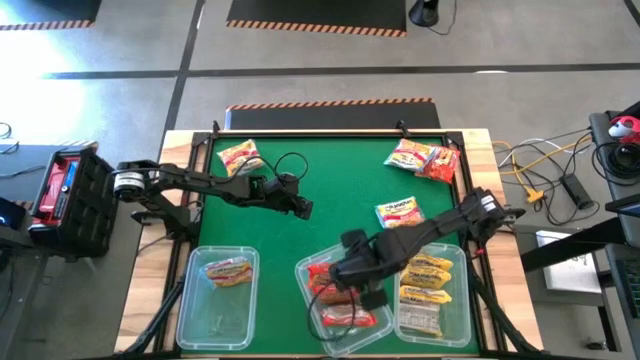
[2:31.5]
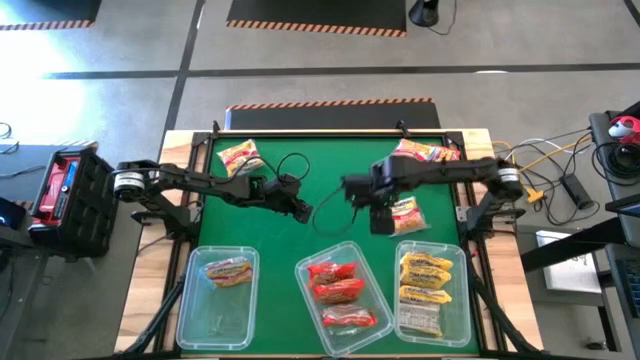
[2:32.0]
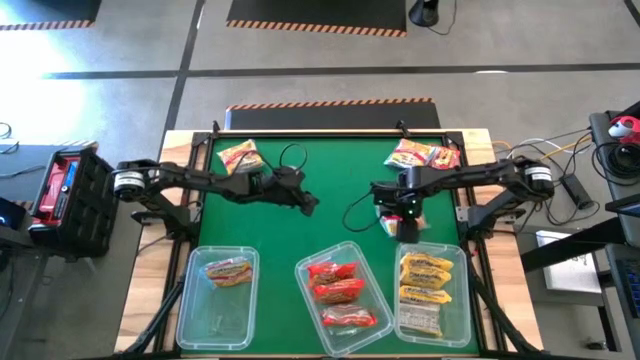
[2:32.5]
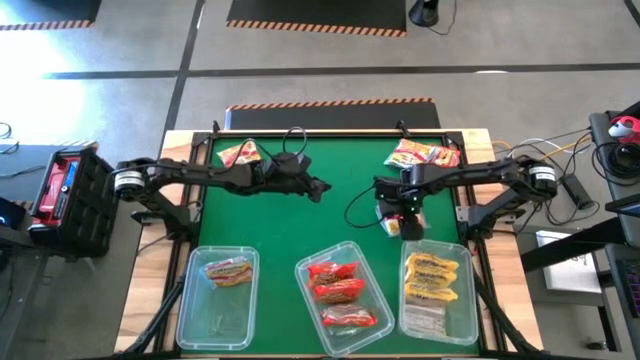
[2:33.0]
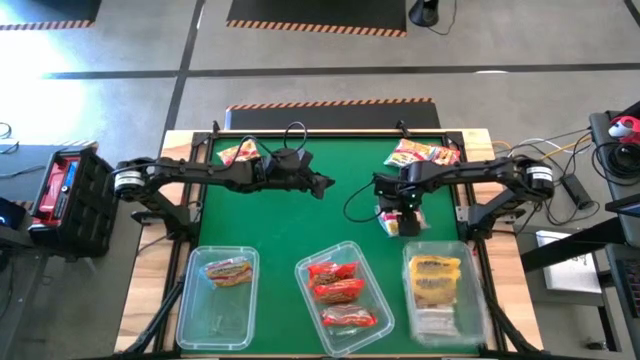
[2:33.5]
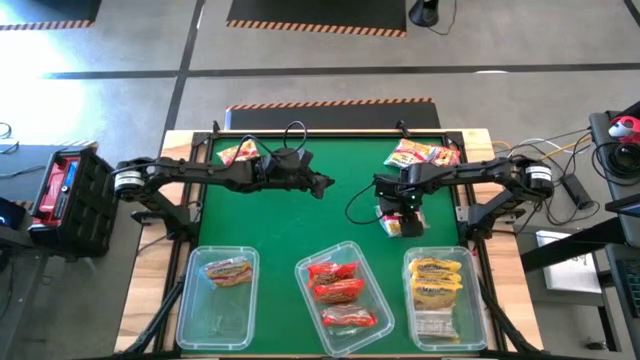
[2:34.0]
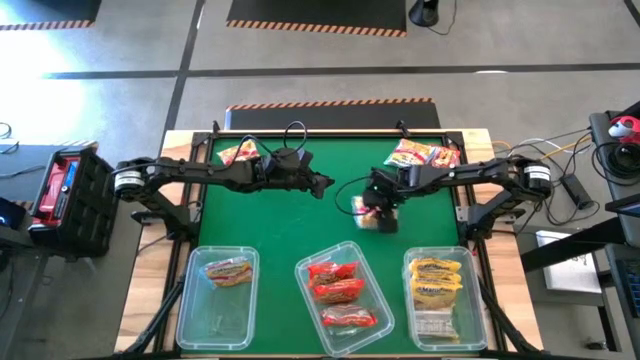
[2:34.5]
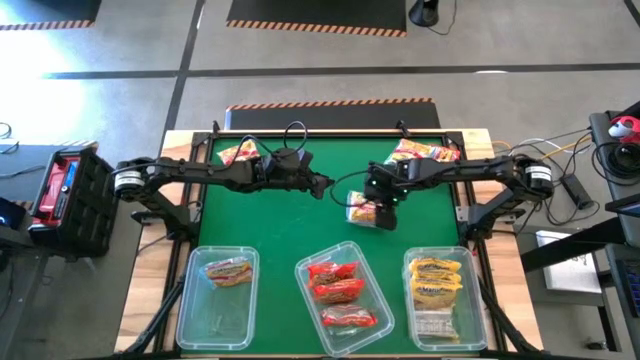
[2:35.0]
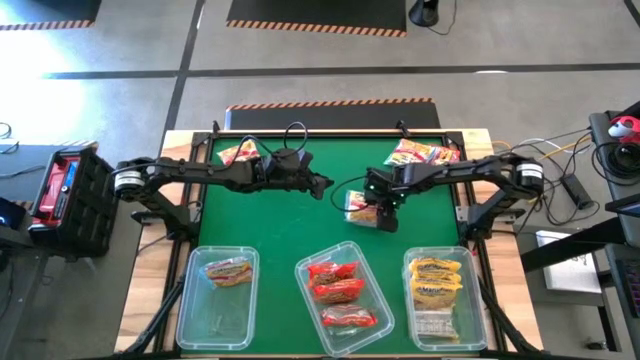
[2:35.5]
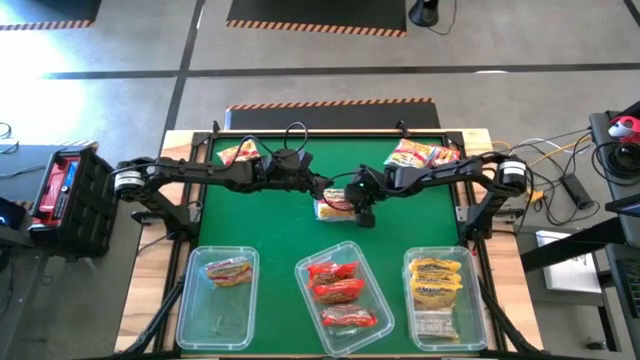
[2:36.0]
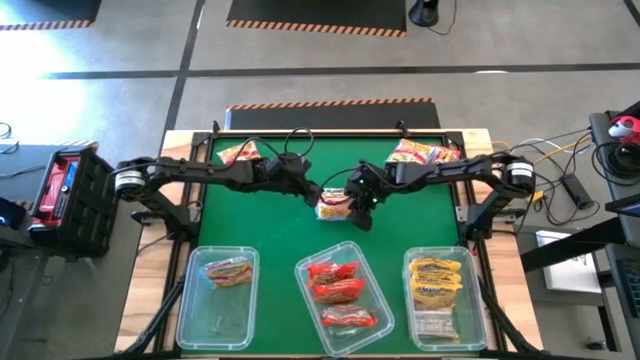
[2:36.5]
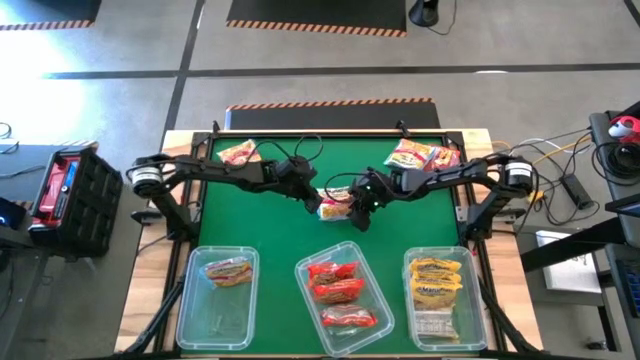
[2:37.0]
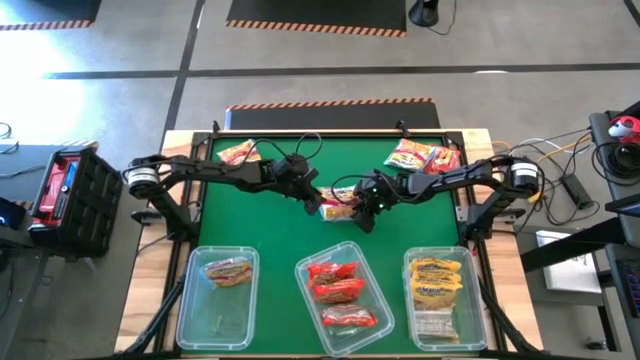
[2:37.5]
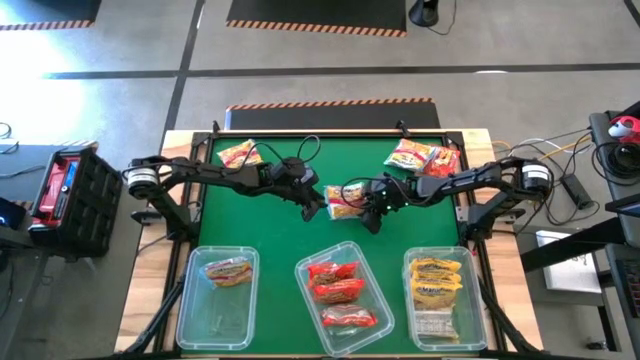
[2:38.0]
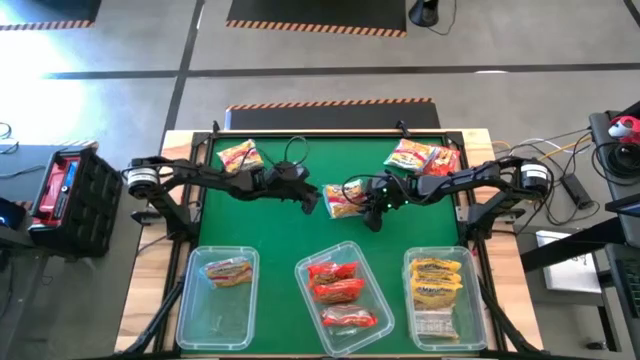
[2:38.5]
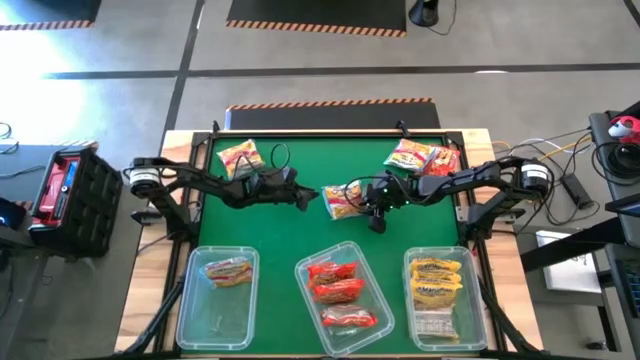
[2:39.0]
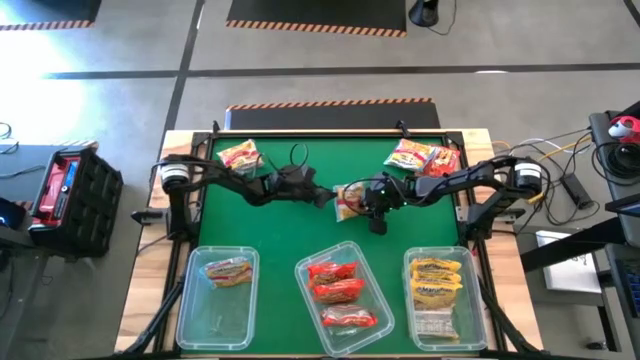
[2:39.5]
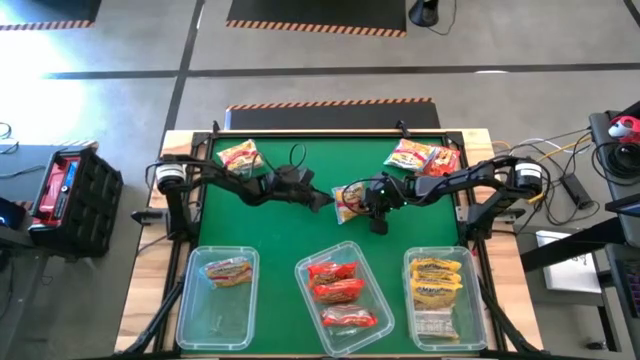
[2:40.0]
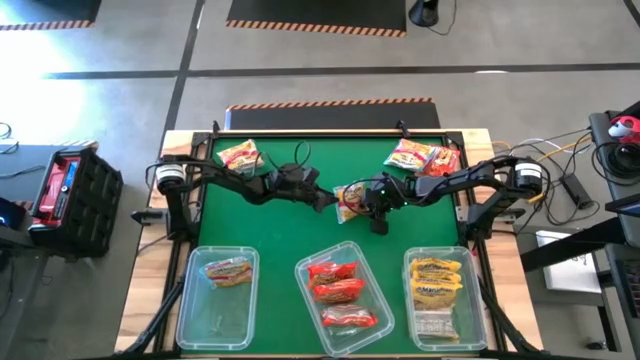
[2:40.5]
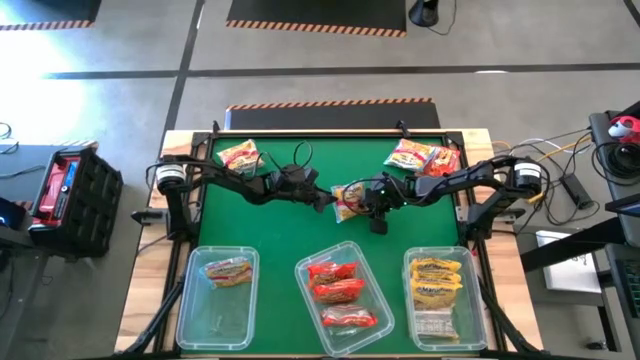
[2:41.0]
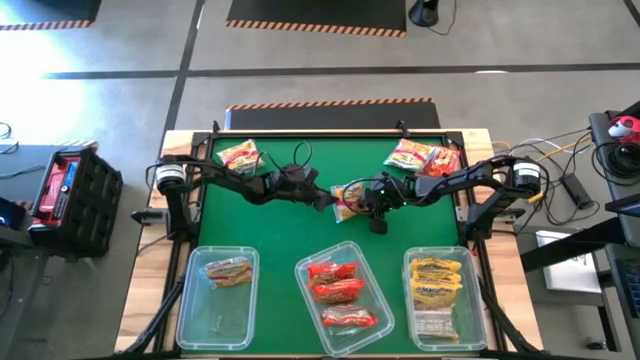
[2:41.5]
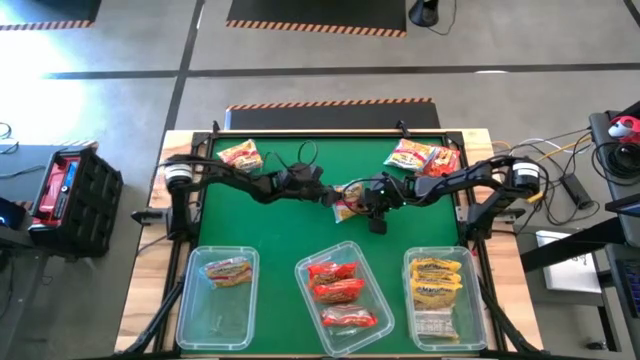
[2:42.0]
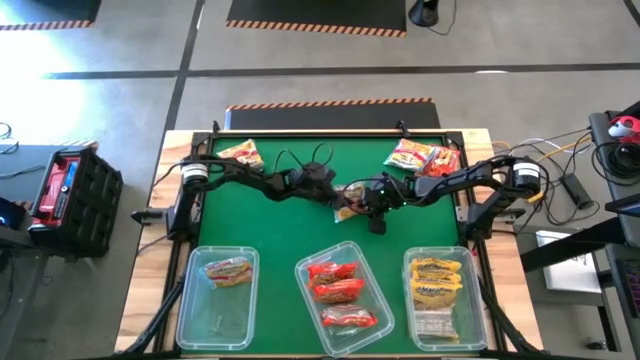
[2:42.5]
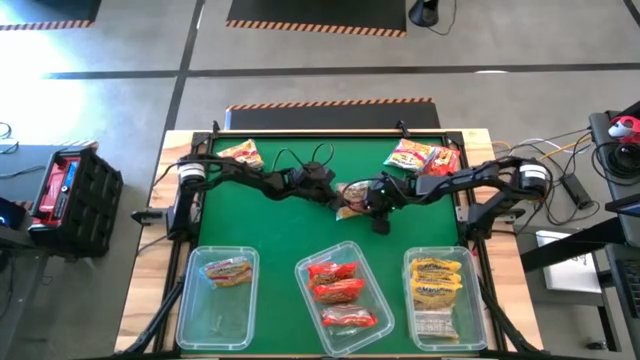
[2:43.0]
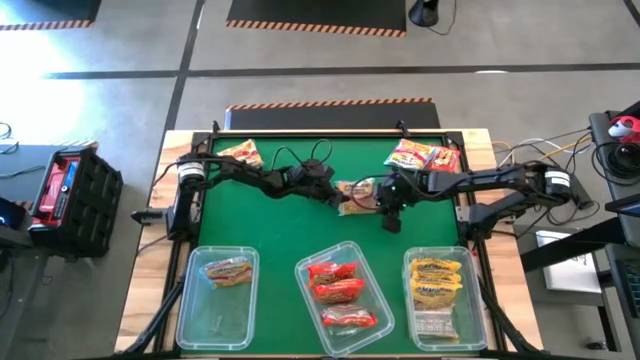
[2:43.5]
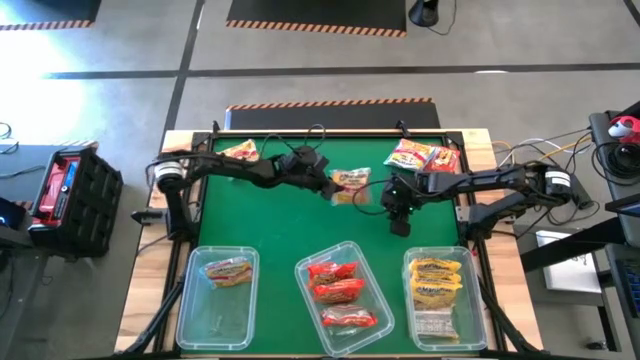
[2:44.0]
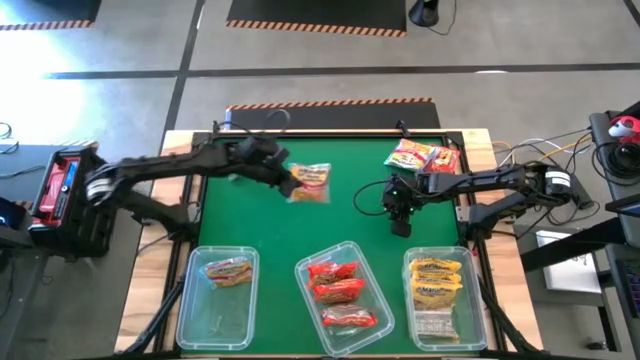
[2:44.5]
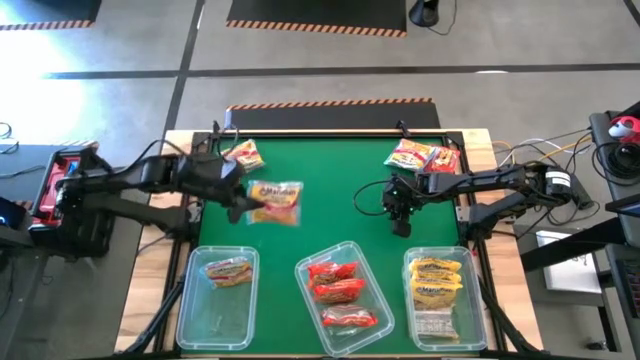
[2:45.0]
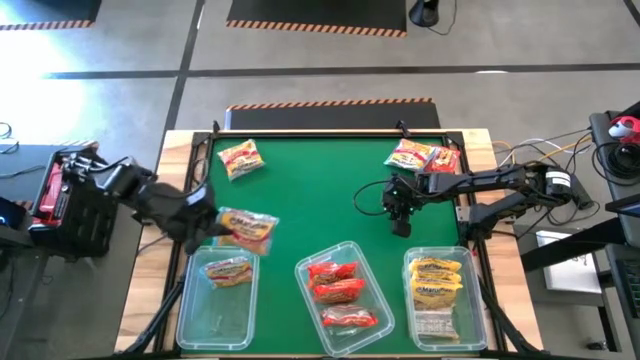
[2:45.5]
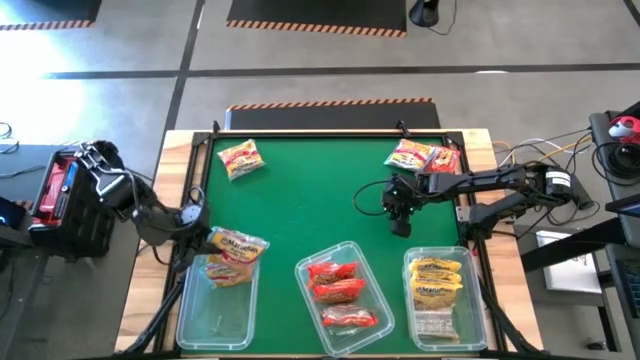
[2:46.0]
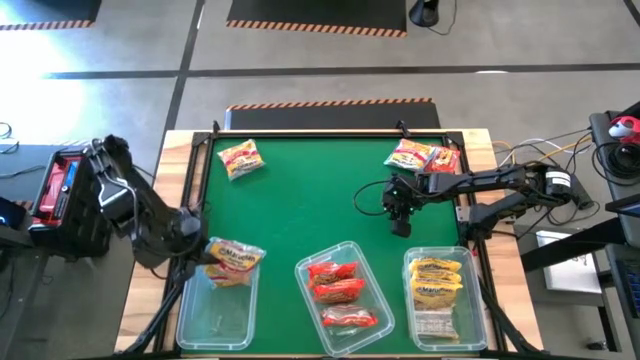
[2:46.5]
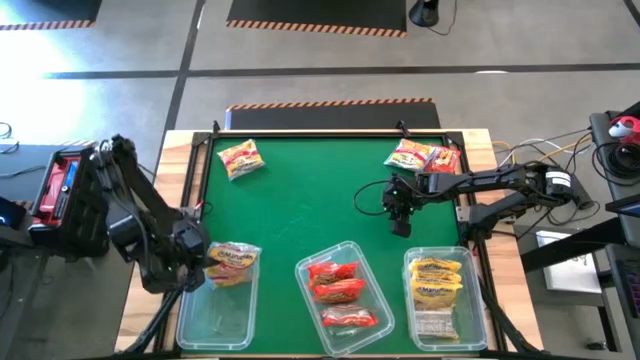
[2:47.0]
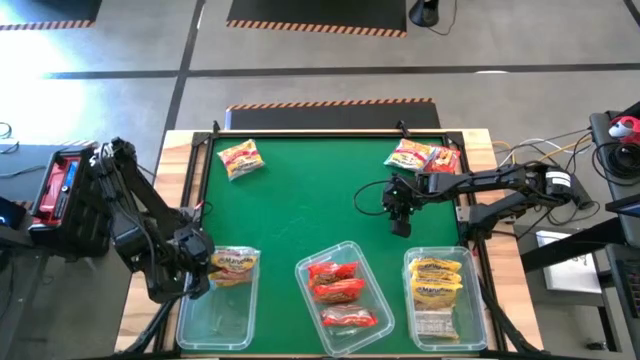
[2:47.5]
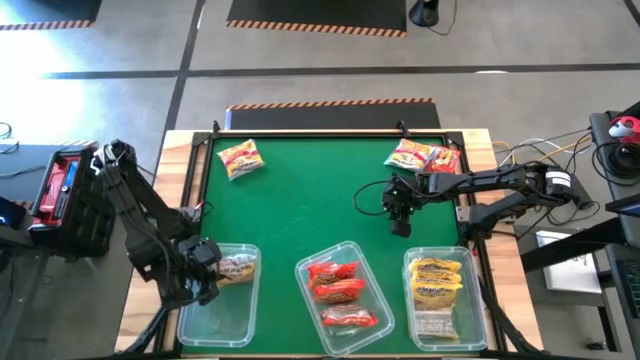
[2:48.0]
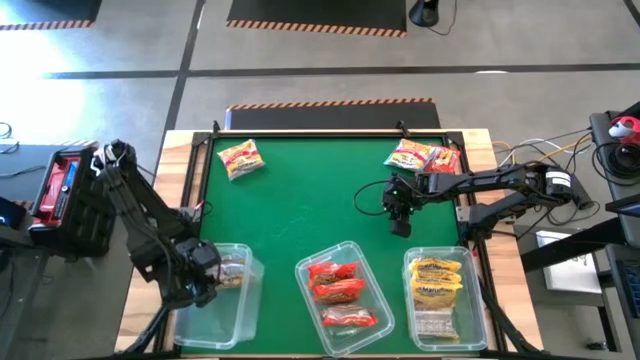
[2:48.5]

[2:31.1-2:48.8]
Task: Sort Maruchan noodles
Put the blue noodle pack into the left transparent bin

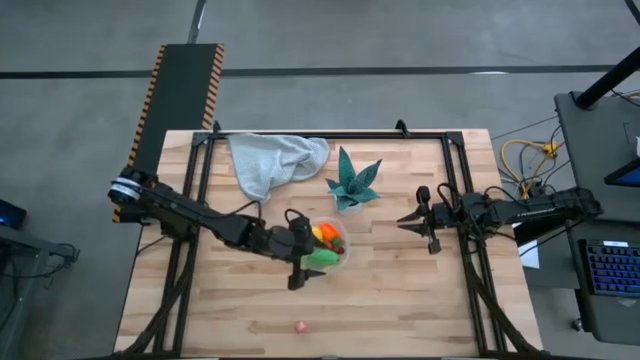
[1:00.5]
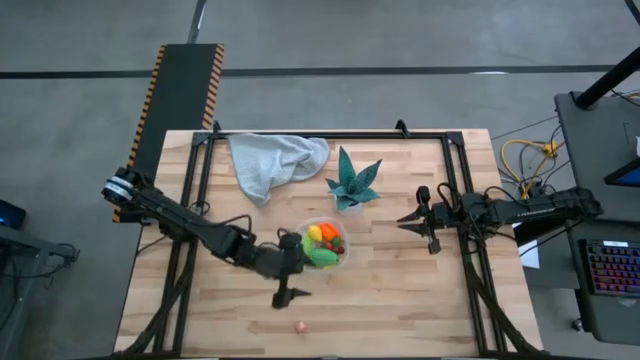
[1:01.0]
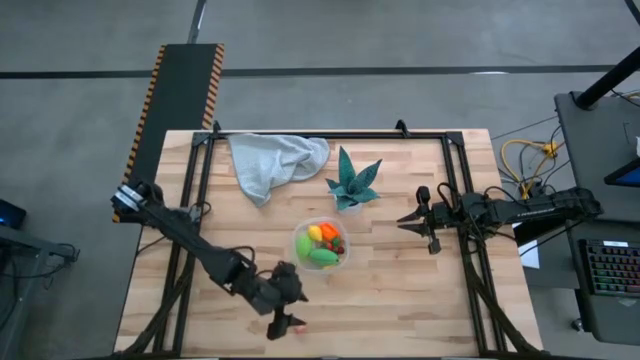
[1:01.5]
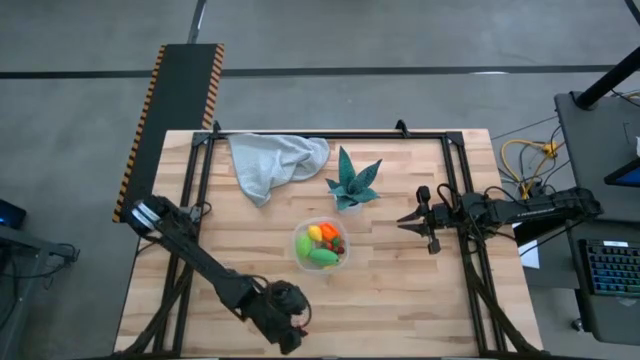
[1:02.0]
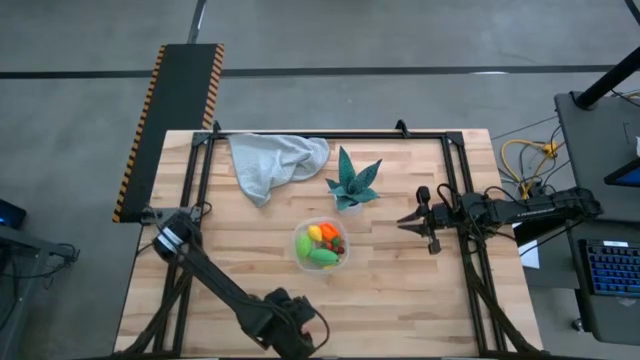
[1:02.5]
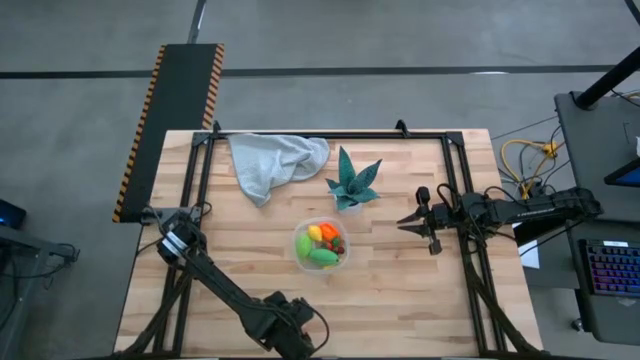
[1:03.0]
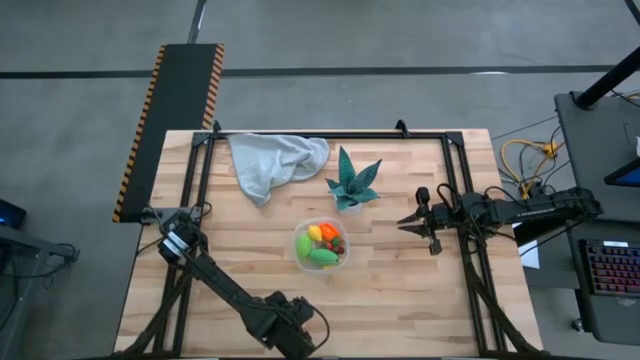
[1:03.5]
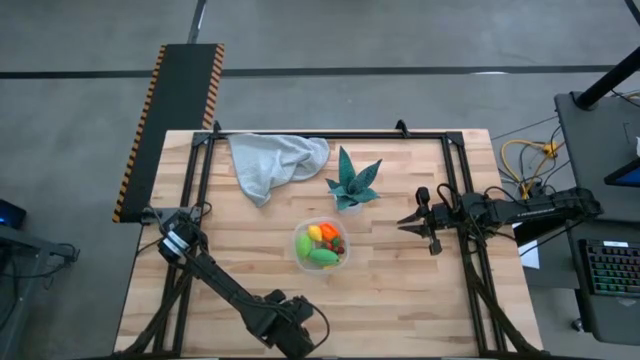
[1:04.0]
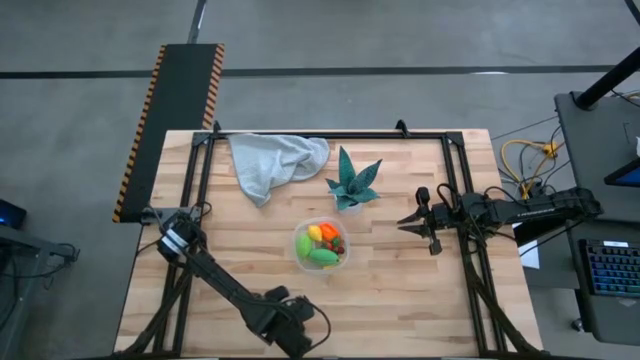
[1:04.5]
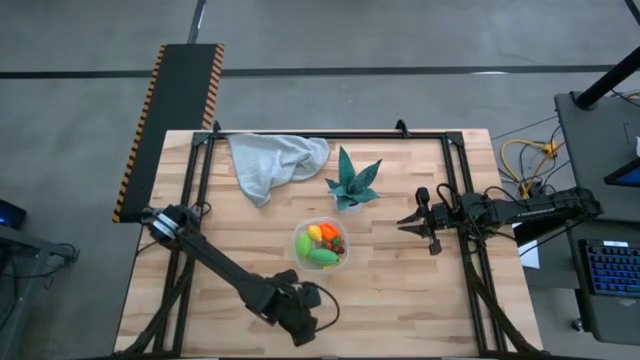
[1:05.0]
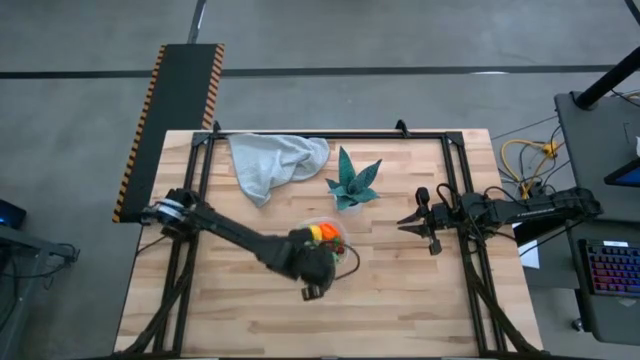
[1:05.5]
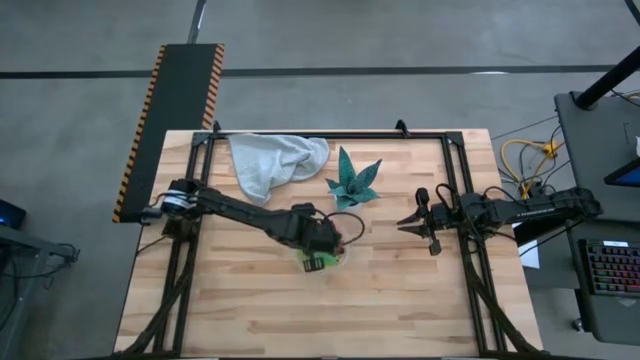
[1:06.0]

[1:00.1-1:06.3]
Task: Pick and placing Produce into tupperware
Put the peach into the transparent bin
